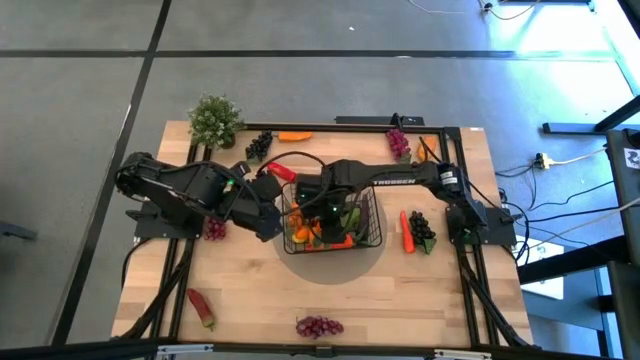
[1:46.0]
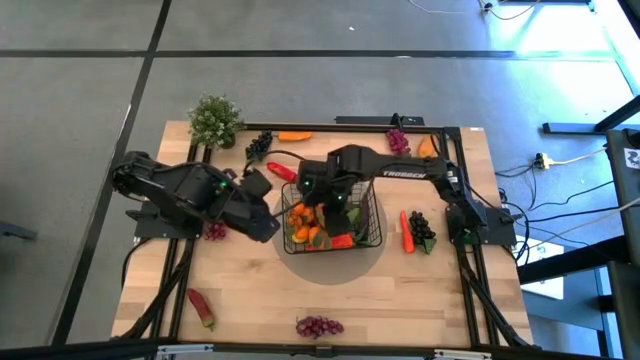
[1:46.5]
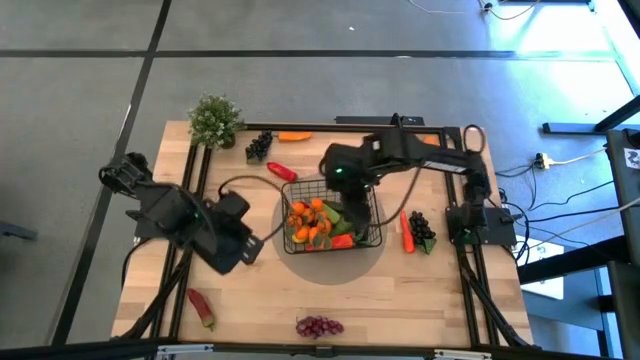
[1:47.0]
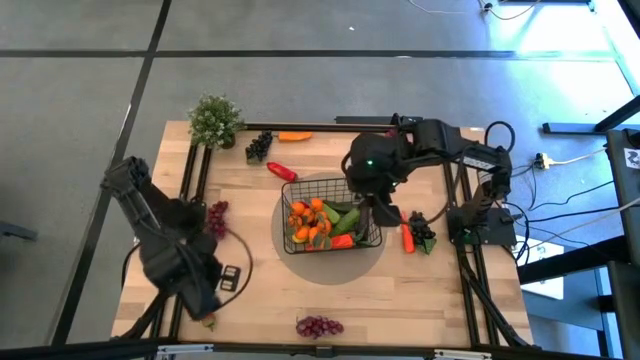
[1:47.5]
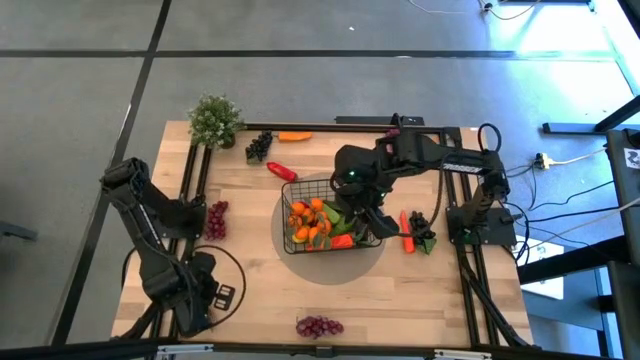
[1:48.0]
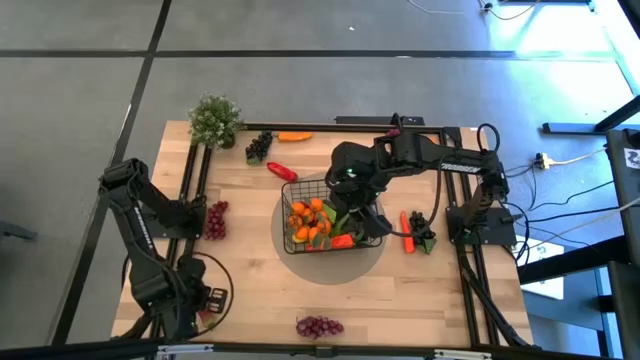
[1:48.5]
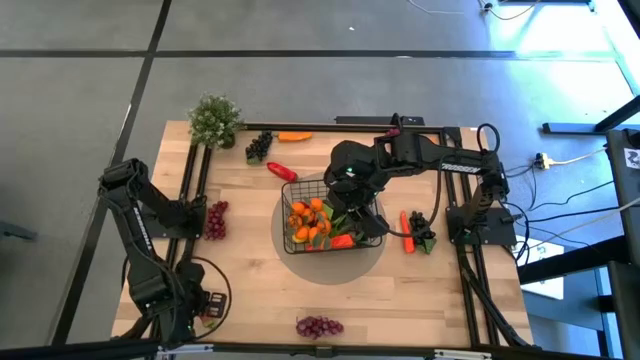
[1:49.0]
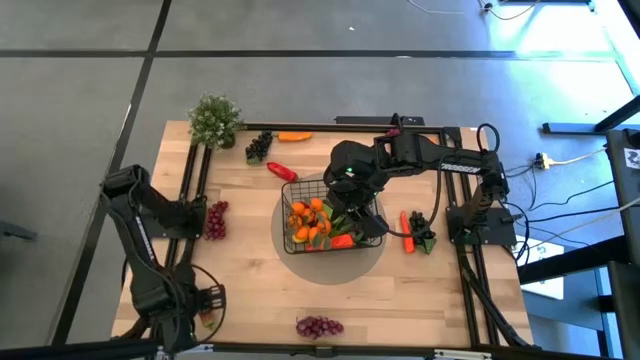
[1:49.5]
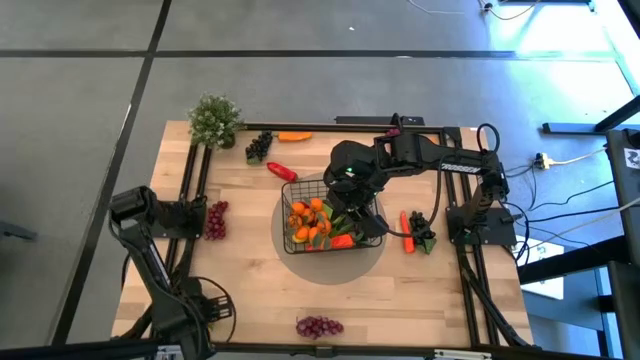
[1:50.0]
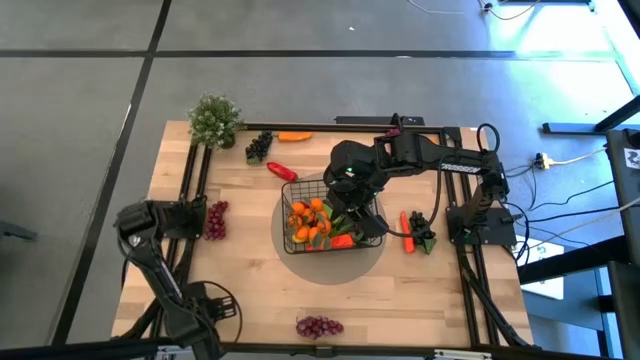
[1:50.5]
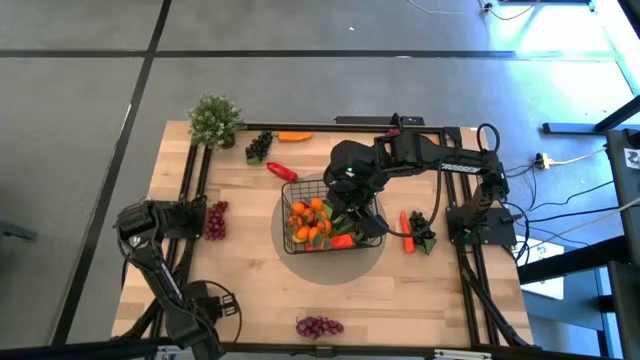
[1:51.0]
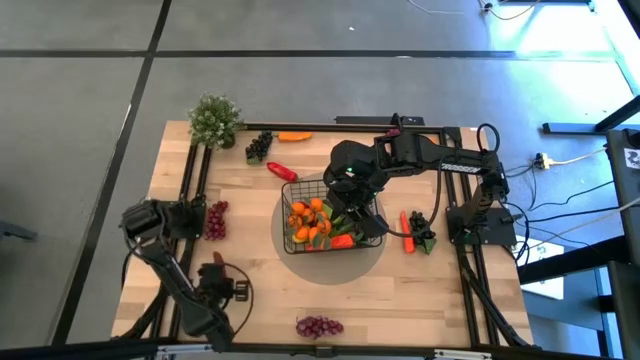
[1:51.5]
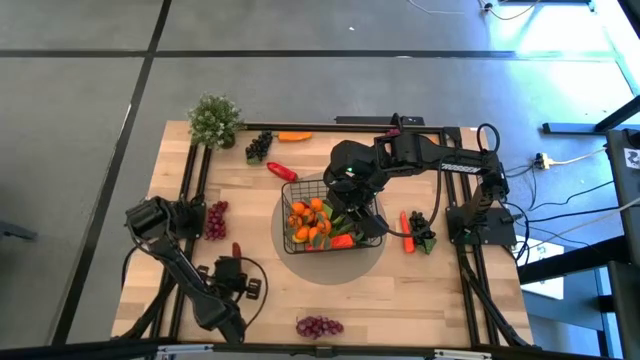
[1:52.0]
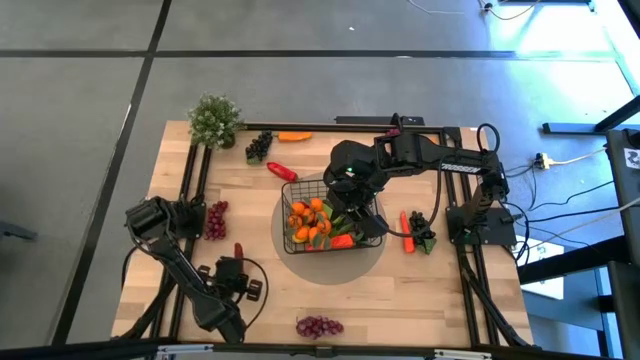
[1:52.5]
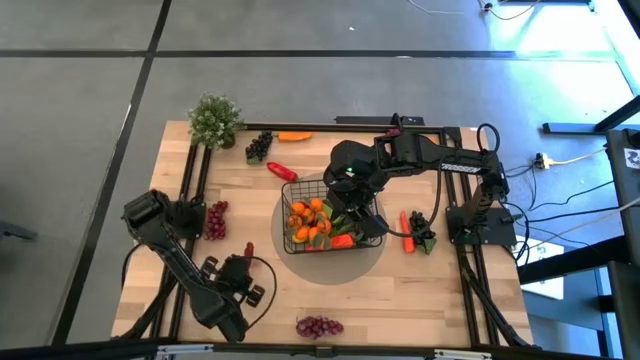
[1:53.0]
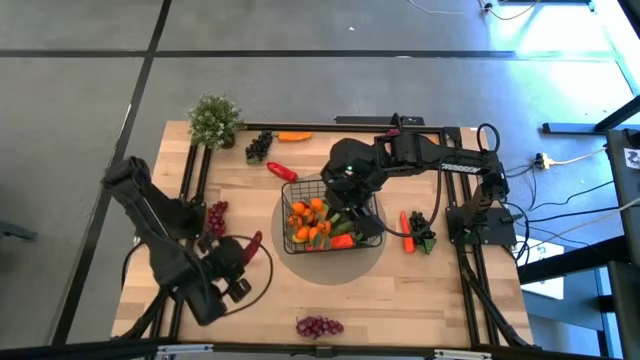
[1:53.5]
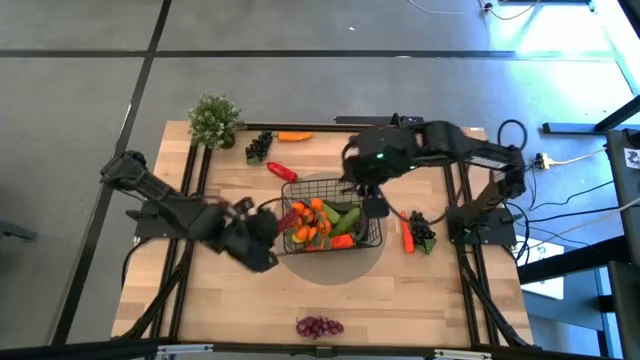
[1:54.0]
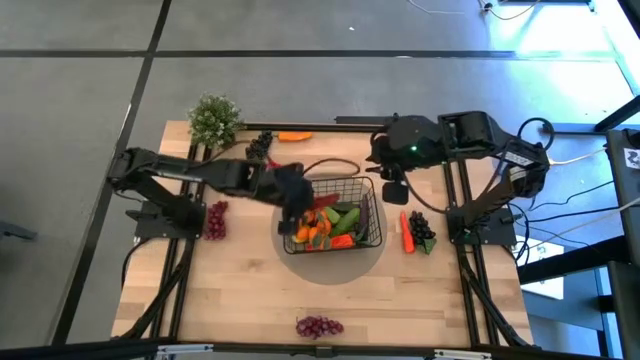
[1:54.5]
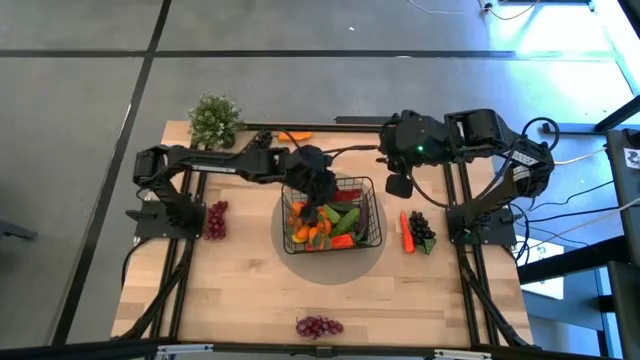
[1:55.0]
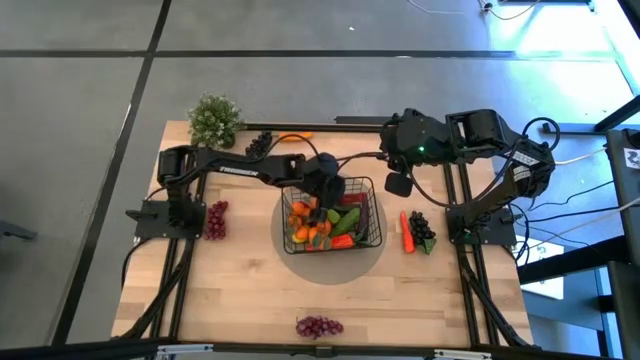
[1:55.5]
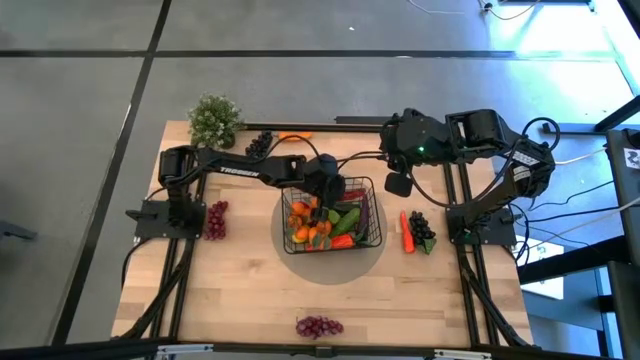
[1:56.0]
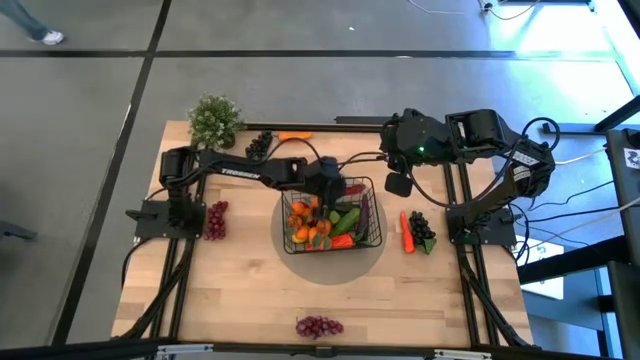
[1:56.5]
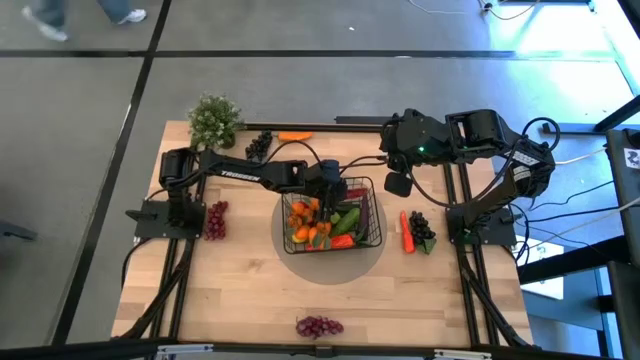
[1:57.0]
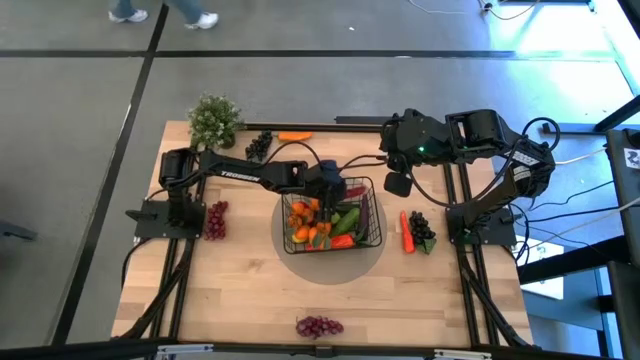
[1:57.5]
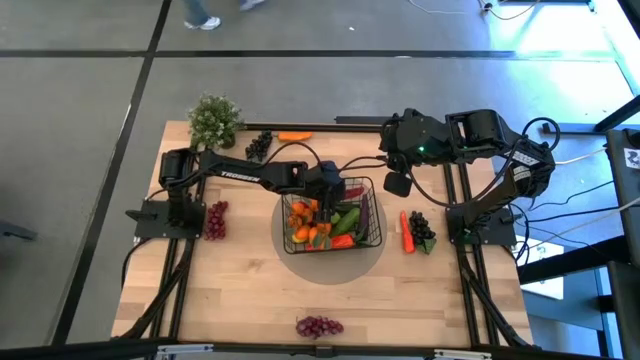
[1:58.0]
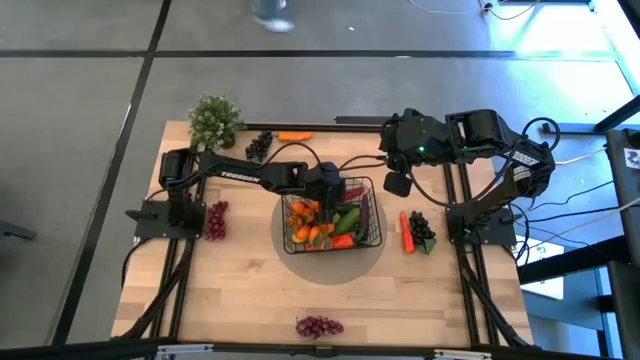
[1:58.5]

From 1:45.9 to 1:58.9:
Task: Build produce basket
Put the bottom red chilli pepper into the basket

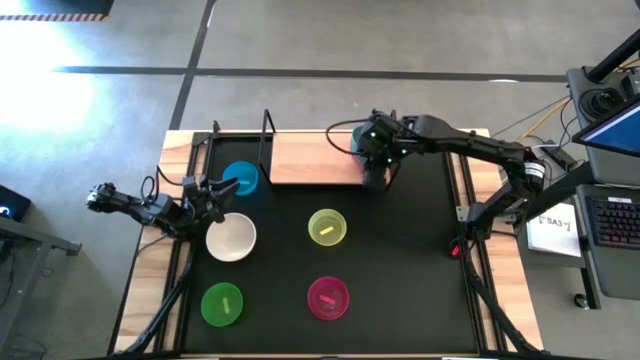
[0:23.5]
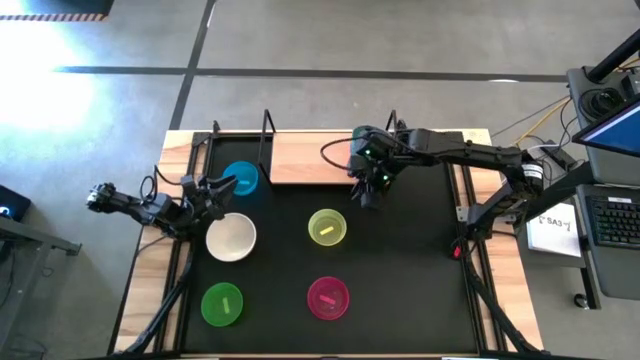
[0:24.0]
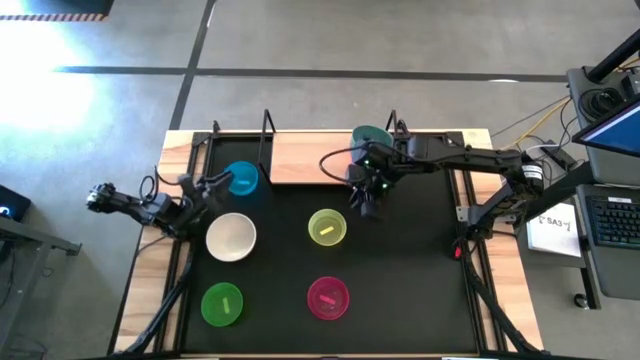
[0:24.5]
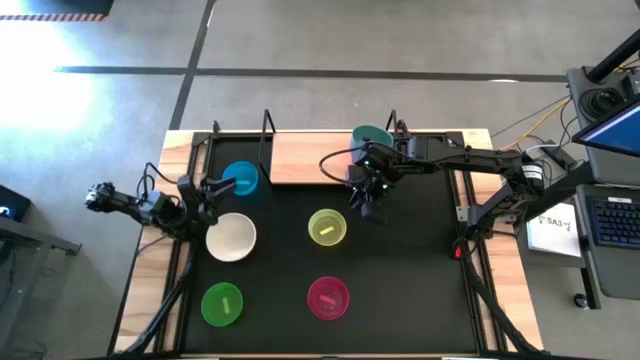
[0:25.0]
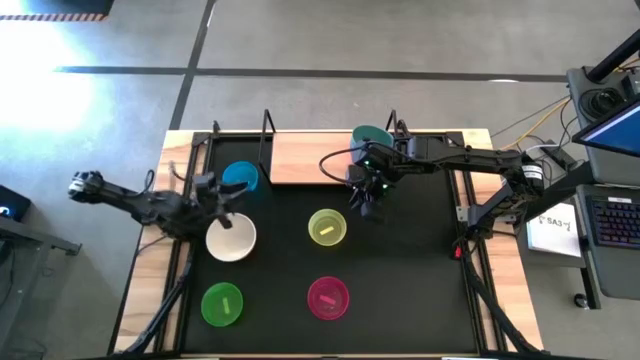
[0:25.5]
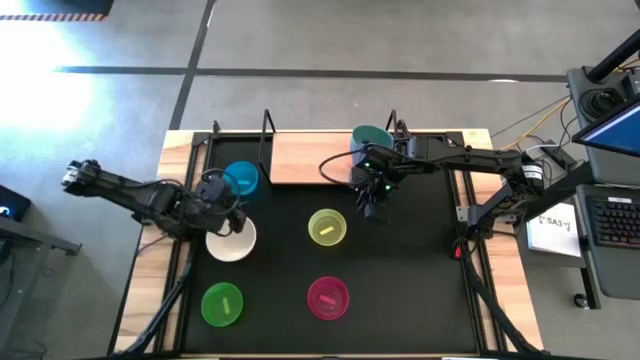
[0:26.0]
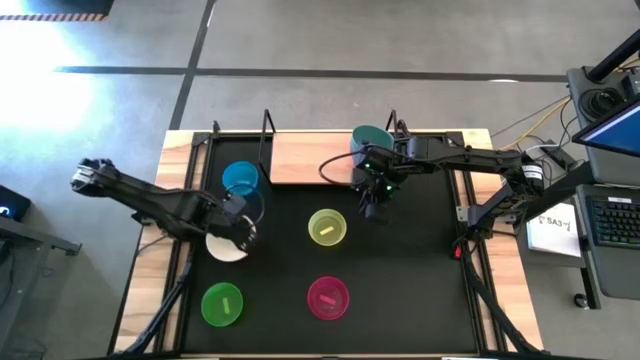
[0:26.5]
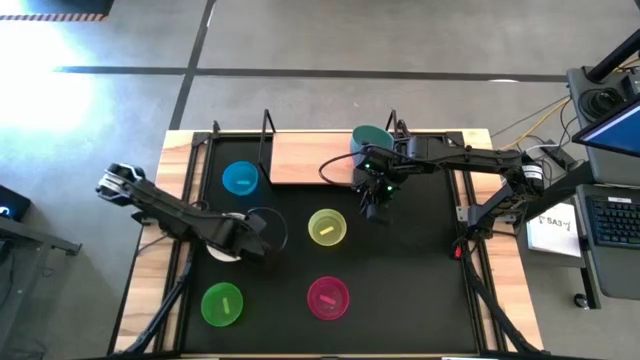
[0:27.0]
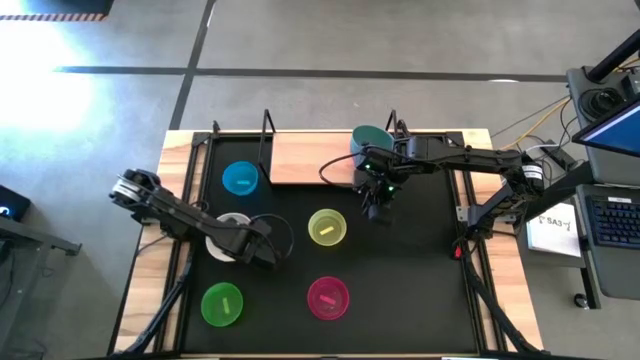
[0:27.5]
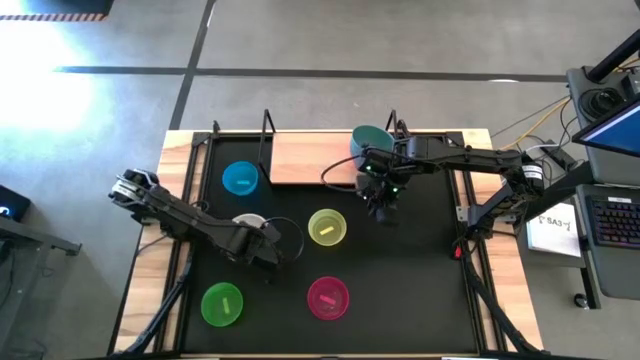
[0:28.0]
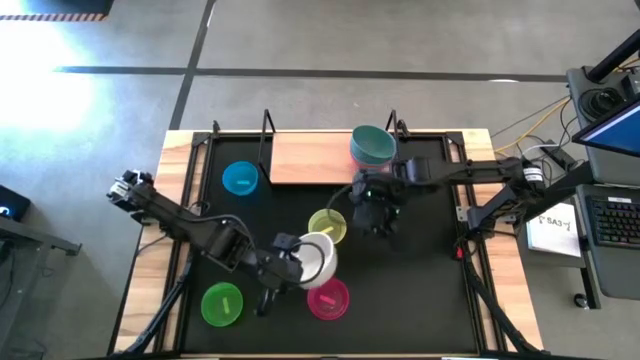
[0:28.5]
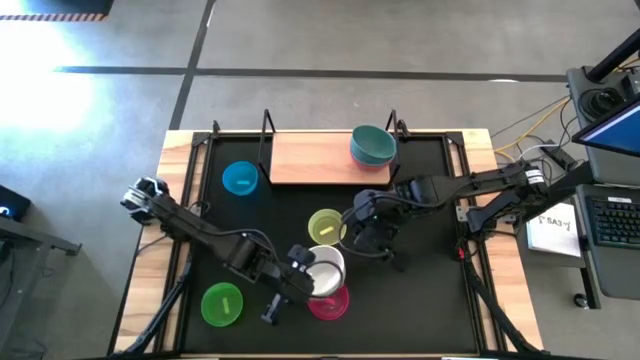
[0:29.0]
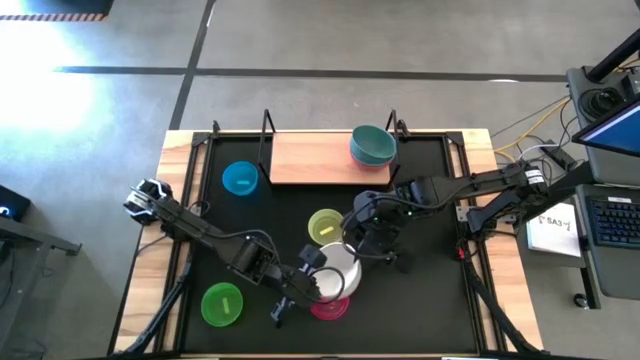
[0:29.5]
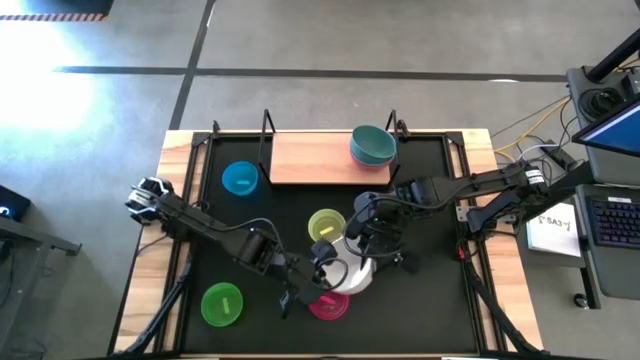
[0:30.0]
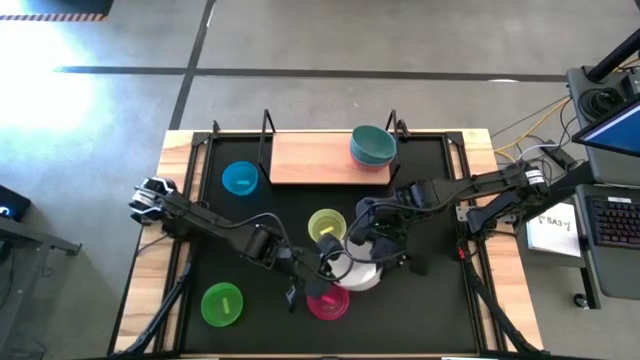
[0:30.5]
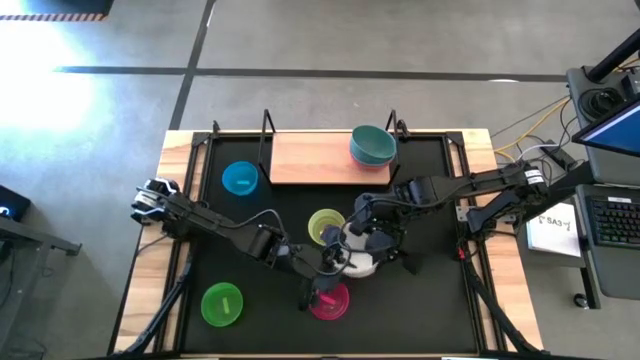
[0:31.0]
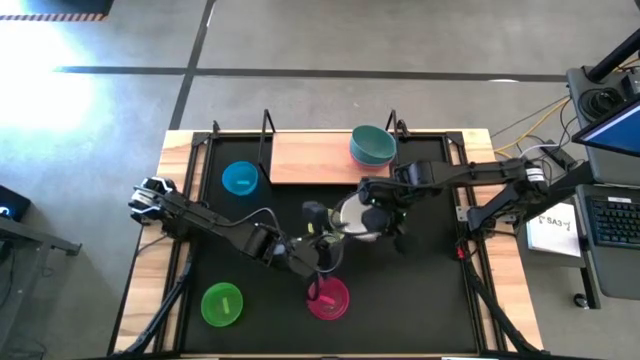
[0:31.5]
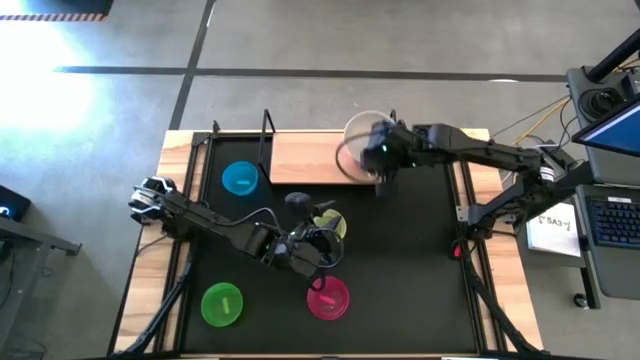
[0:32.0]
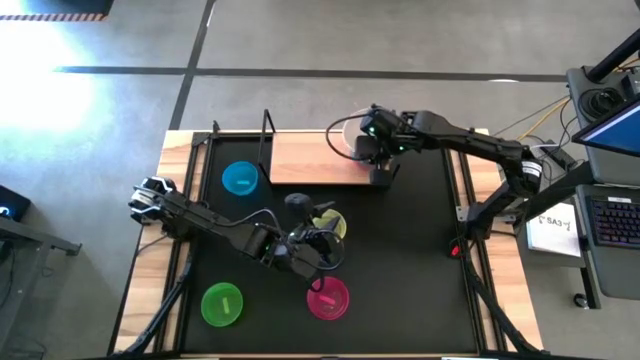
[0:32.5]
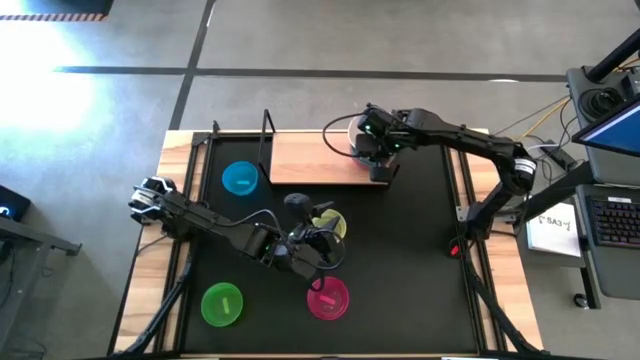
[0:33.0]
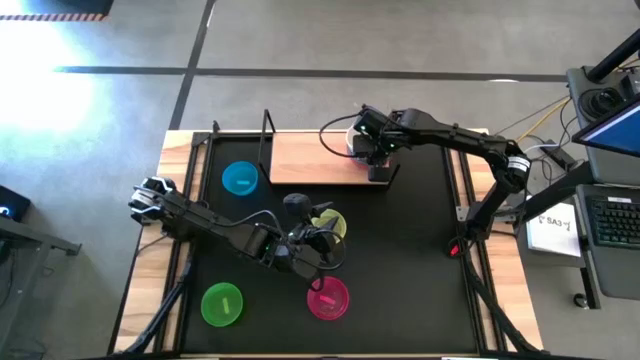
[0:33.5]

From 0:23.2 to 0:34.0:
Task: Place and stack bowls onto a shelf
Stack the white bowl on top of the pine green bowl
